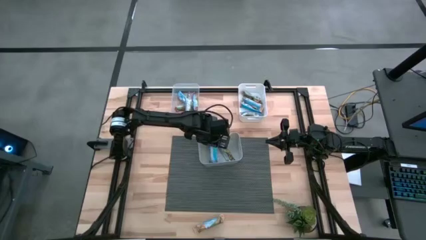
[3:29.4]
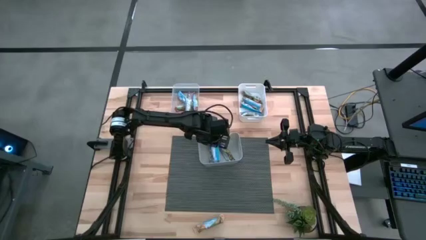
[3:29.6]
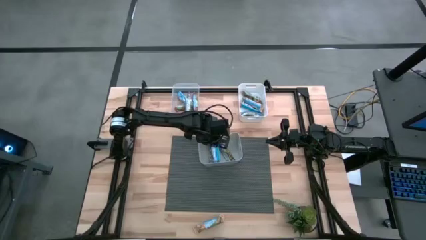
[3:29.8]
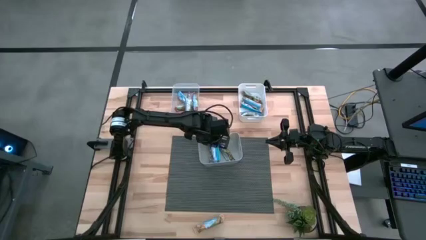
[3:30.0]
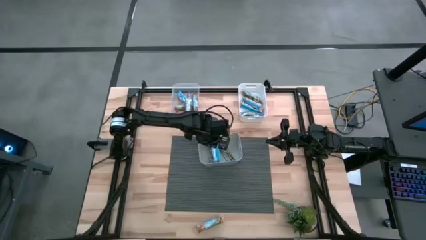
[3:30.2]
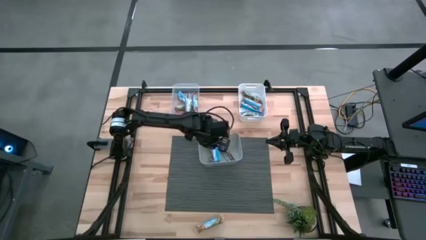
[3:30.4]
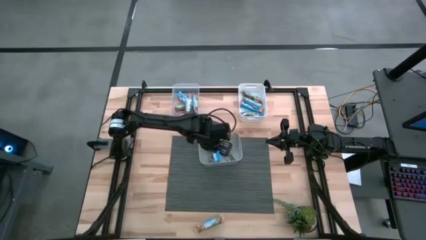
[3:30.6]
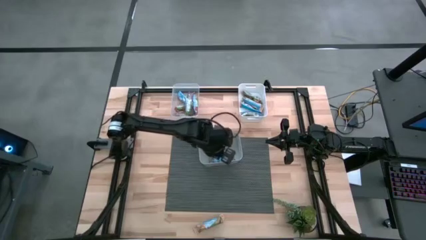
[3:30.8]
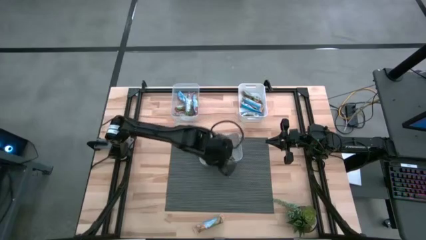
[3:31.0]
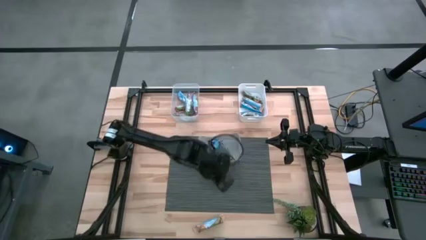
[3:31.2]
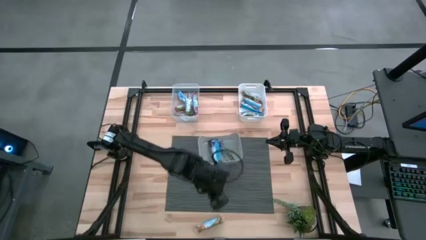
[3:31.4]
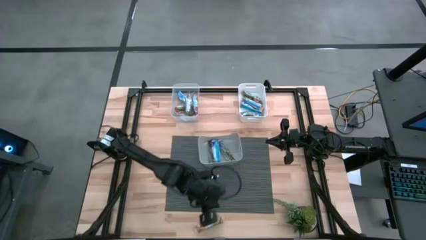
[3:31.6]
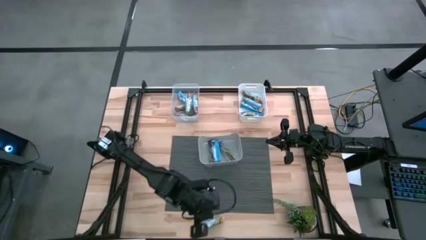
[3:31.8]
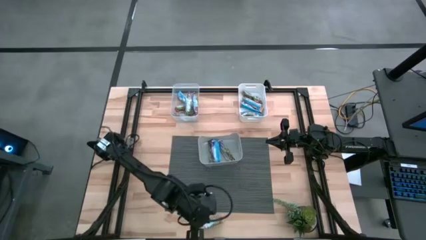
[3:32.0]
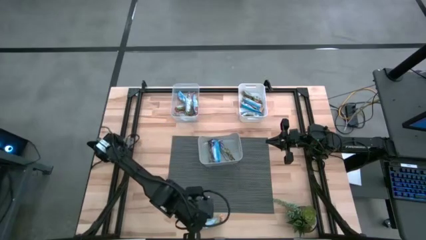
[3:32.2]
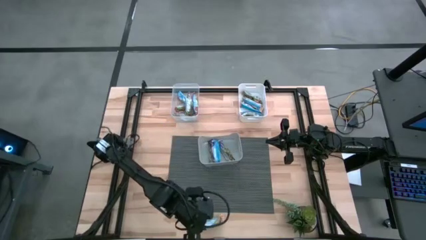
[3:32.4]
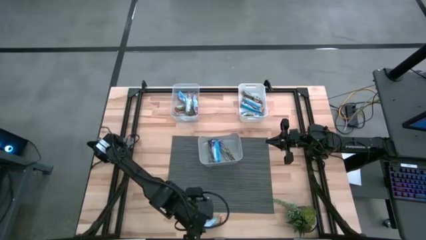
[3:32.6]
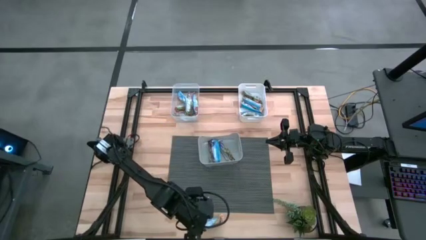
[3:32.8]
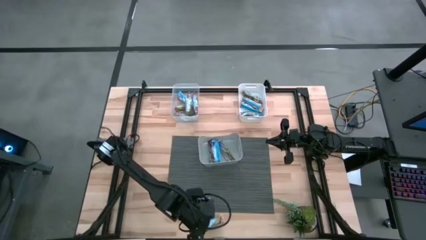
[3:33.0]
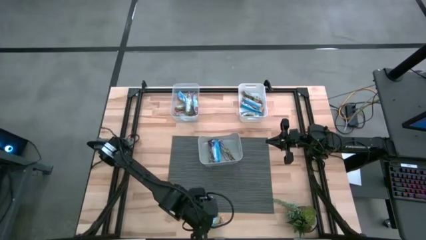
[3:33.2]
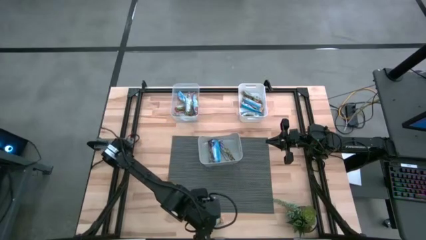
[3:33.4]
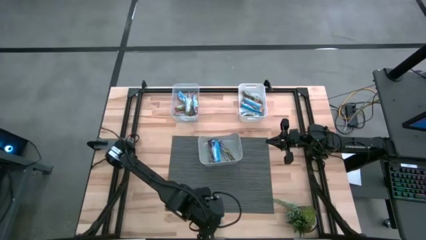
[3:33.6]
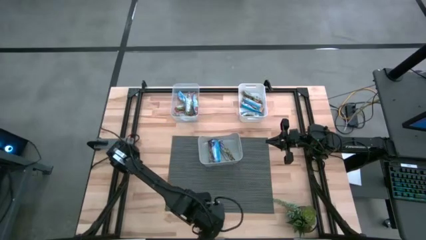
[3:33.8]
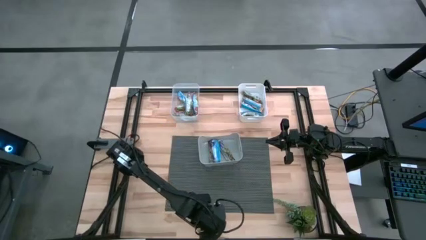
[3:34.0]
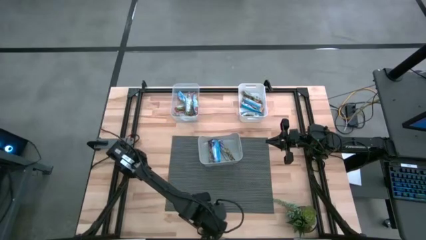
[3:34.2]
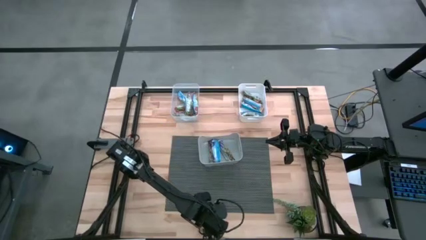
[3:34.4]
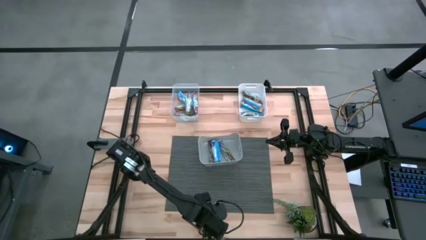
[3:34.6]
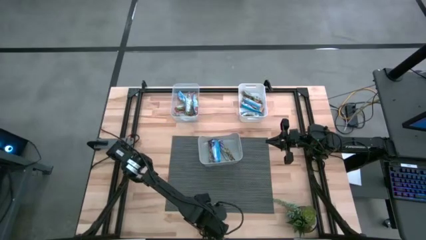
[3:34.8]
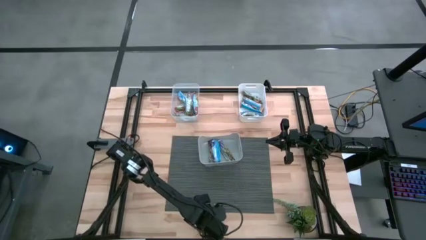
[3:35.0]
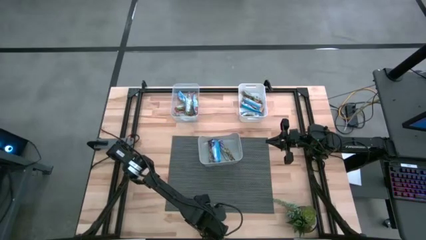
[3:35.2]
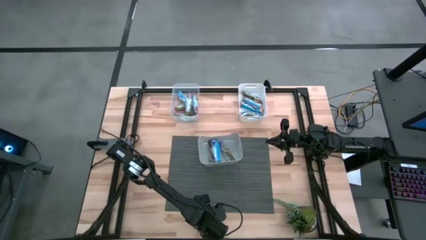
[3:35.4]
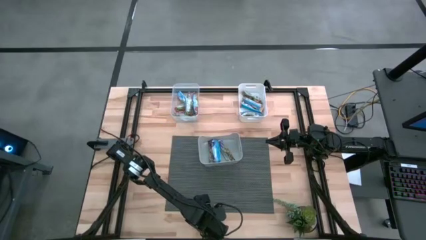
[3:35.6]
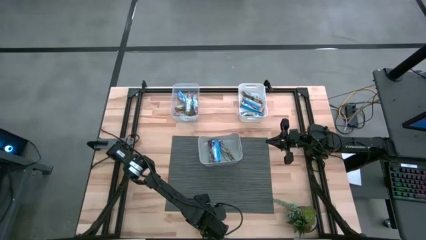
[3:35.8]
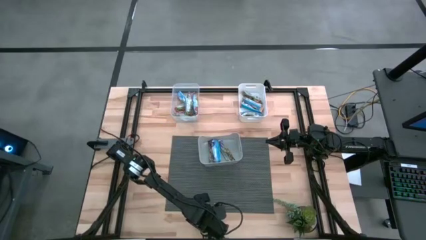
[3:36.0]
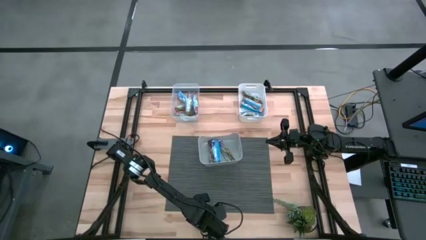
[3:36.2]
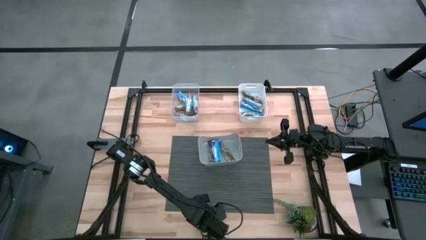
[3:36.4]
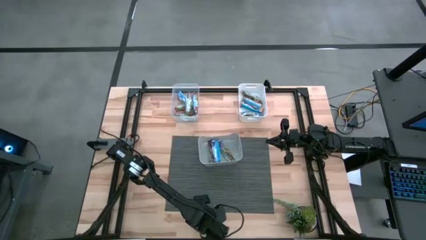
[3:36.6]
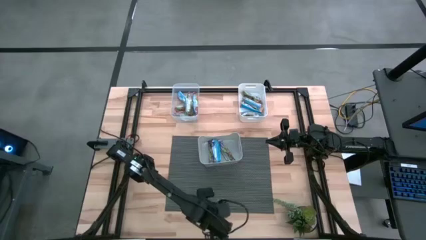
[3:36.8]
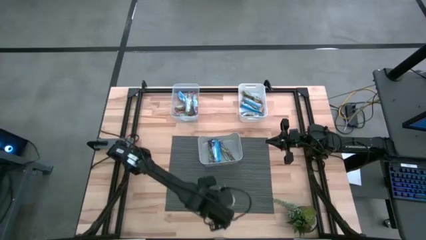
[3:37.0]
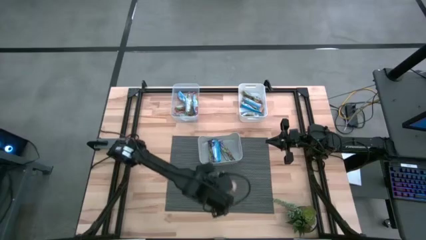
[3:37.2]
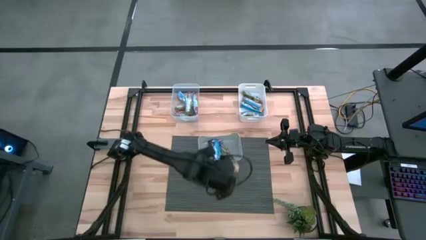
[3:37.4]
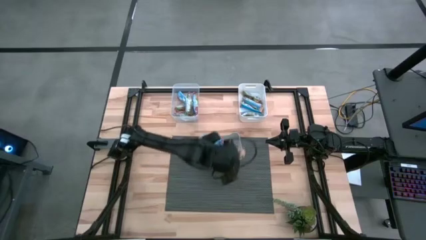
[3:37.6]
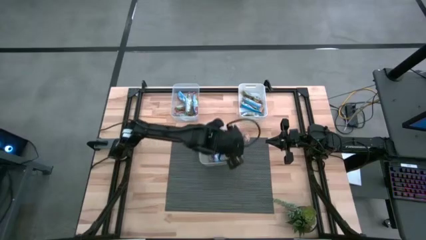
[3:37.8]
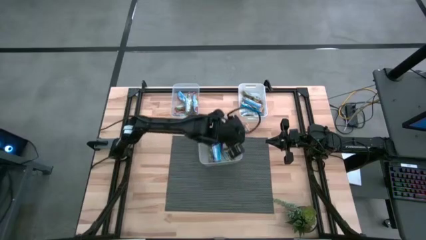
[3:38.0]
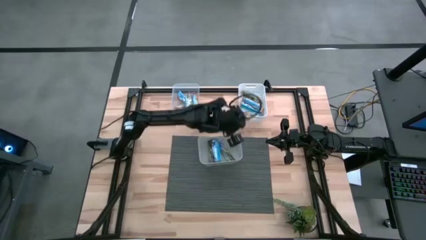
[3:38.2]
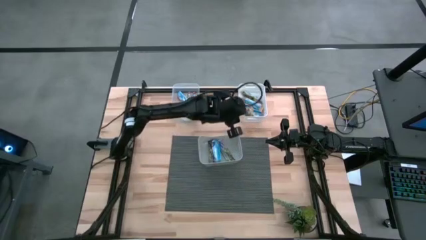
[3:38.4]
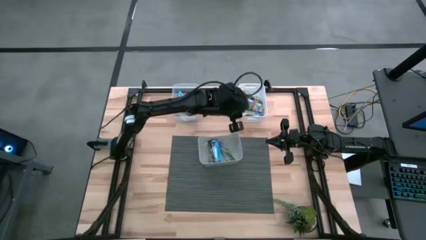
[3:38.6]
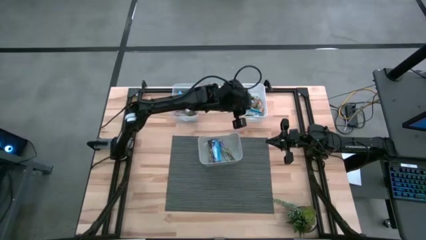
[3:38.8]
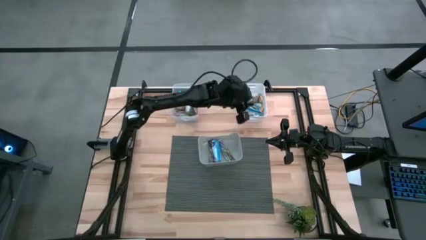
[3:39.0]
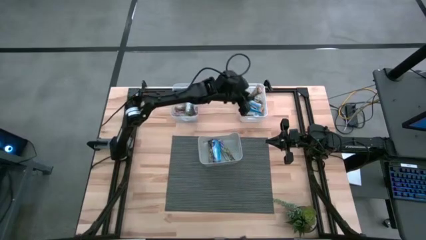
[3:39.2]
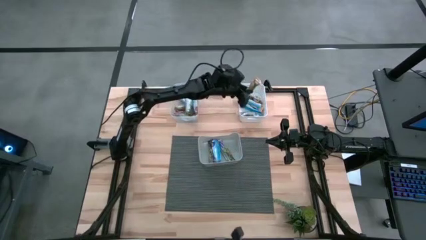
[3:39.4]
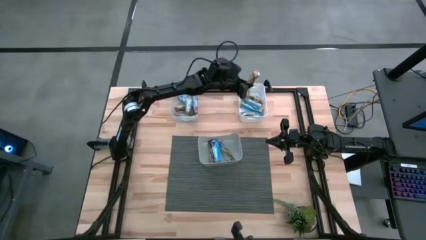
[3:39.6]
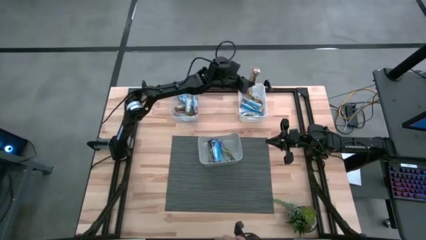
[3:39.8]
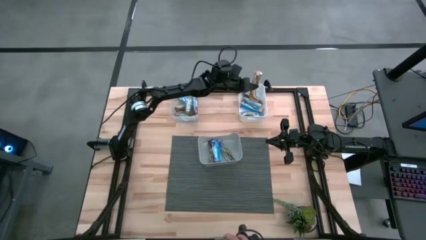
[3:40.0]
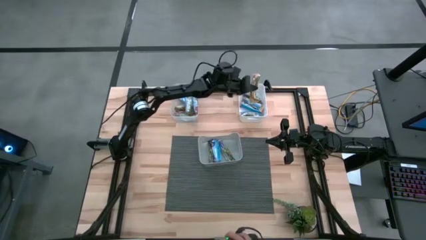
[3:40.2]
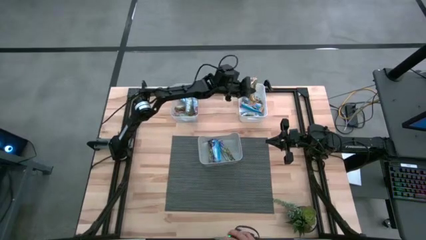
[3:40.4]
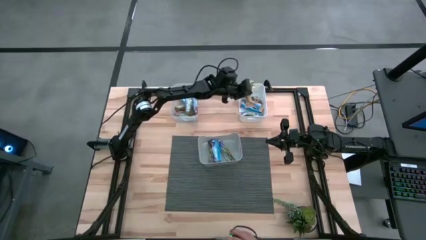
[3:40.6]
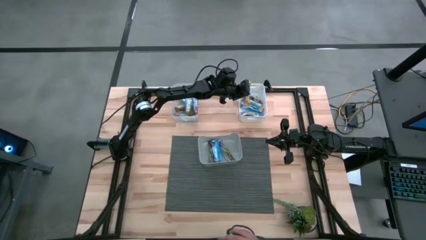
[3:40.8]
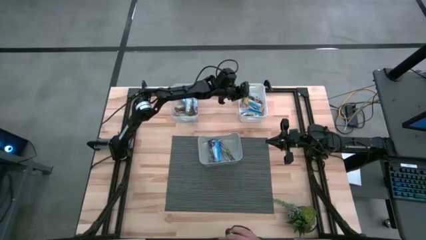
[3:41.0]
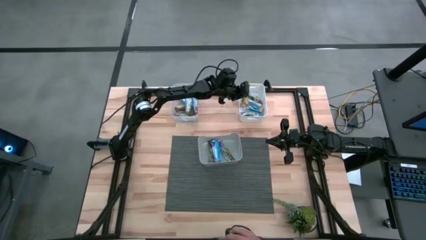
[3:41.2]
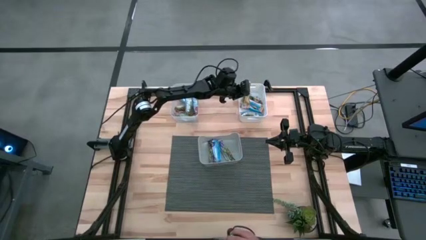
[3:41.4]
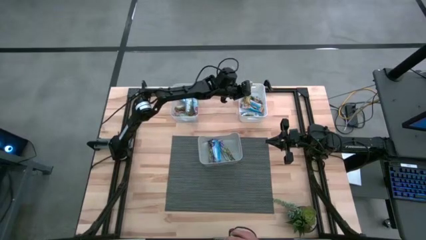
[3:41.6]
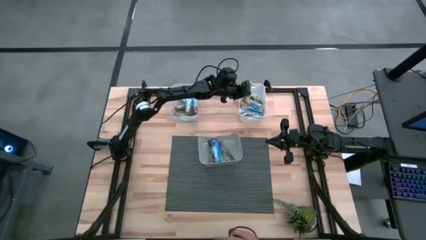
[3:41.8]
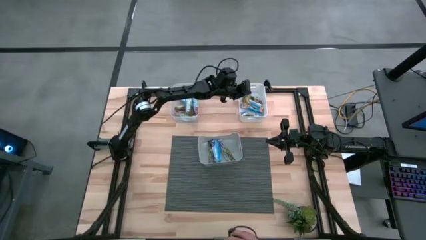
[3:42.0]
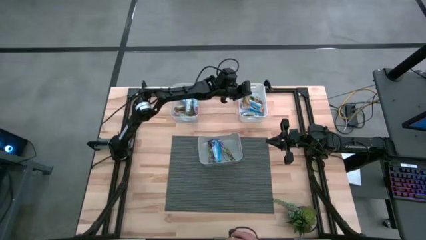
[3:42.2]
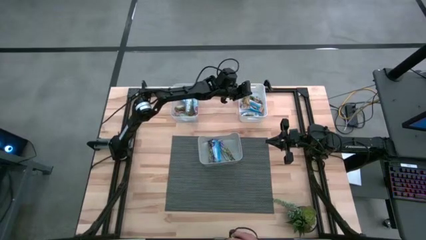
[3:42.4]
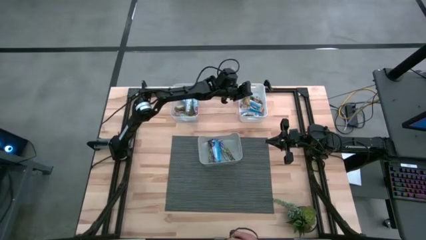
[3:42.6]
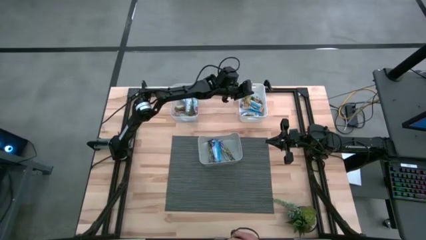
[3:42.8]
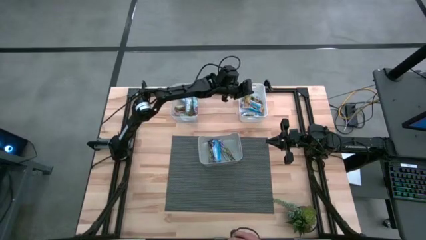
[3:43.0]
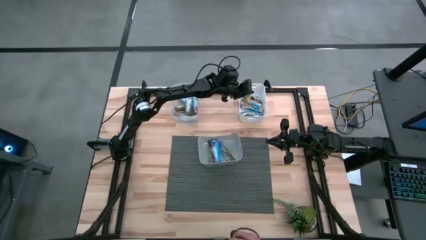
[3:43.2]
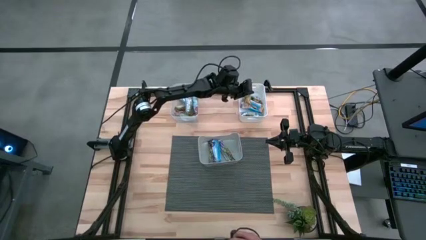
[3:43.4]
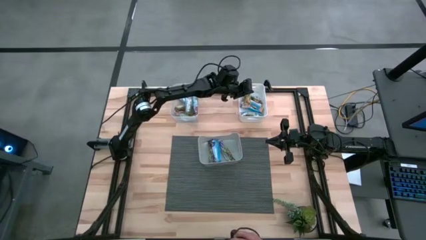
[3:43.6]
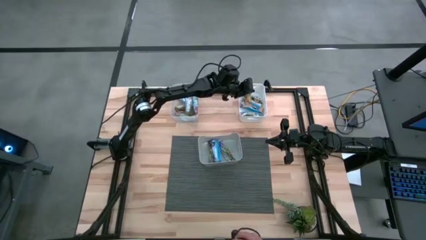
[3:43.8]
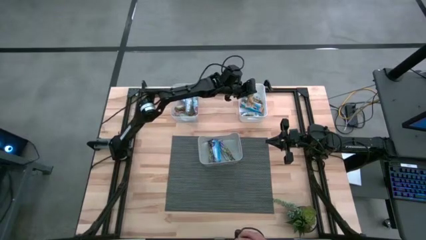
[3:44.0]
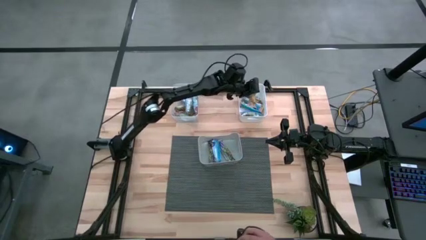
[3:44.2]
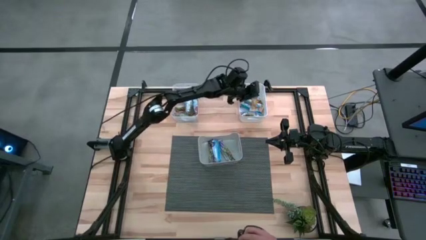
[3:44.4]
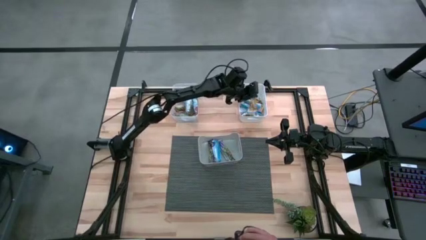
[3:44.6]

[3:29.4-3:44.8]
Task: Pick and place Granola Bars by type
Put the yellow granola bar into the white bin

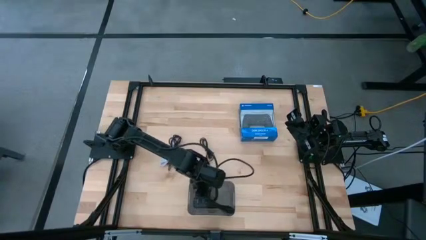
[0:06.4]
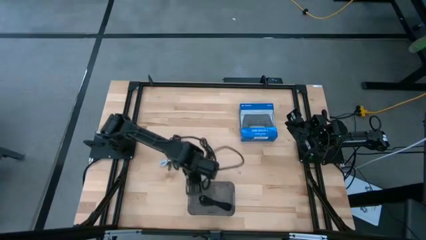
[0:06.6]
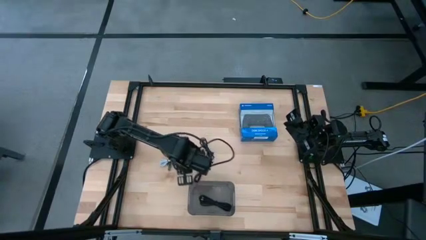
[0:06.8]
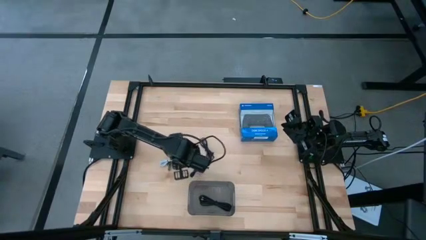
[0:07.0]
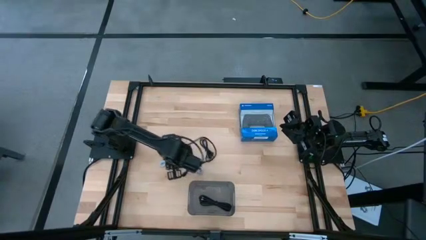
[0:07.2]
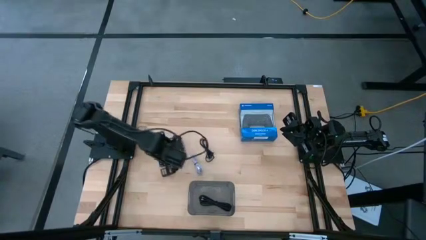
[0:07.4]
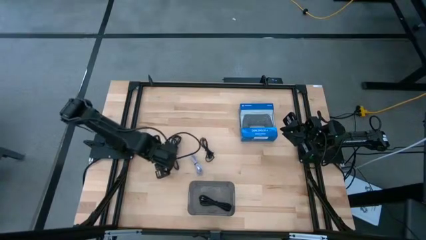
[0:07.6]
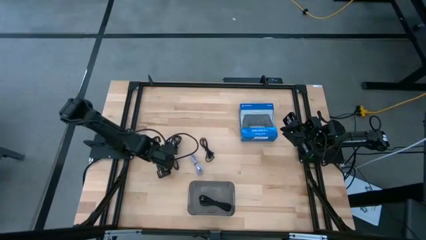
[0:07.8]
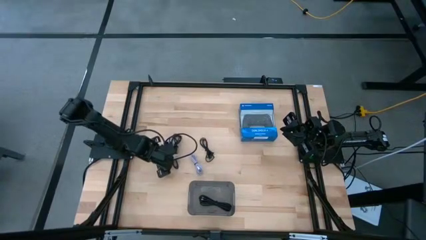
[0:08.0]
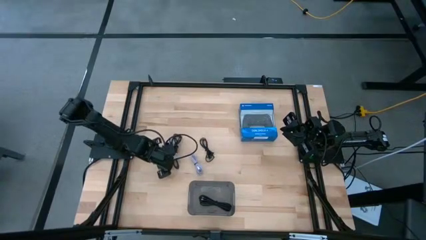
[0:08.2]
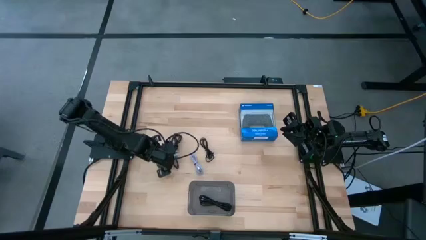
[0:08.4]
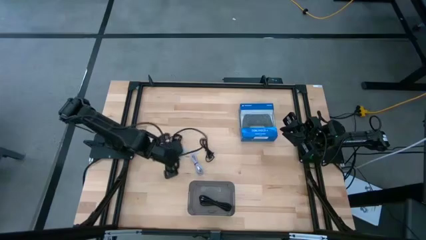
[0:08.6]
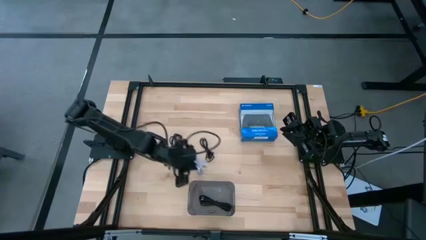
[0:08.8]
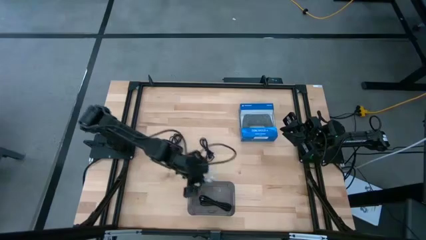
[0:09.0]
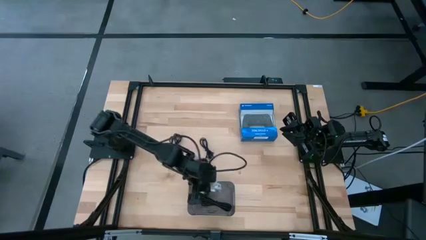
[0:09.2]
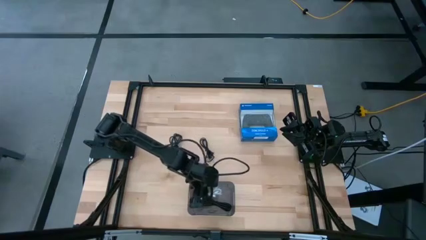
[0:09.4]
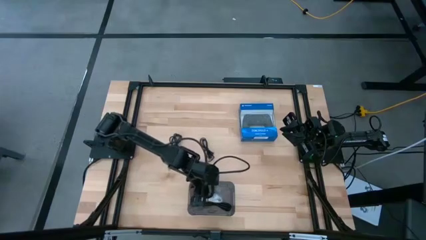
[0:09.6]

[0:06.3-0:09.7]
Task: Pick and place USB-C Cables
Put the left white charger cable into the black bin
